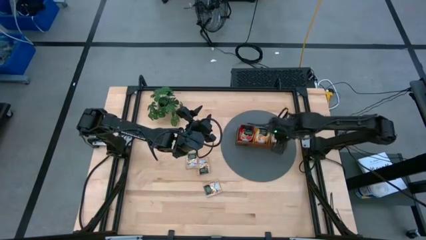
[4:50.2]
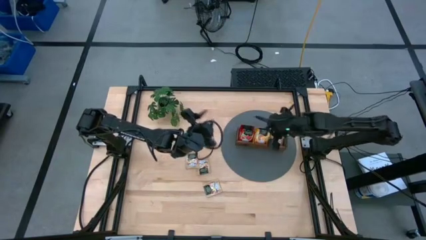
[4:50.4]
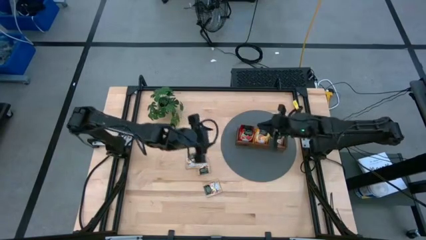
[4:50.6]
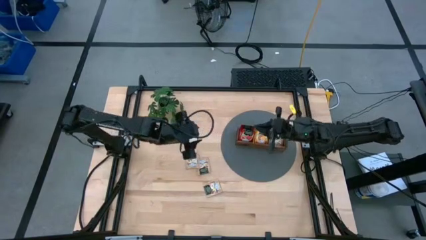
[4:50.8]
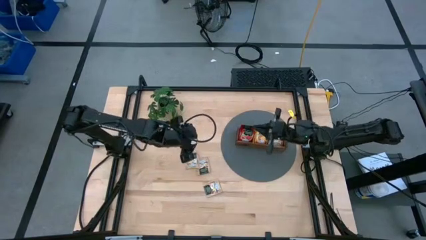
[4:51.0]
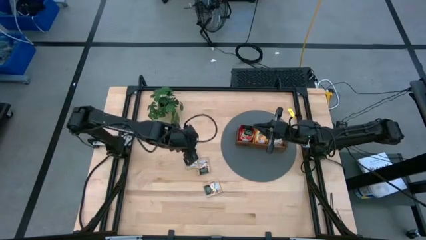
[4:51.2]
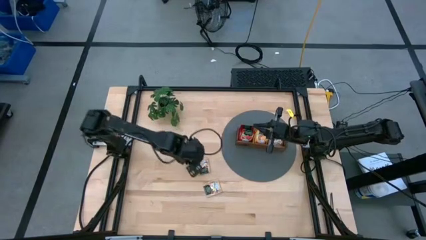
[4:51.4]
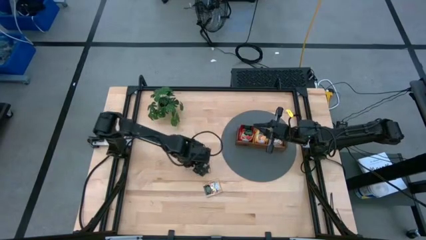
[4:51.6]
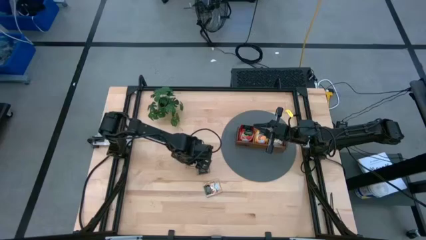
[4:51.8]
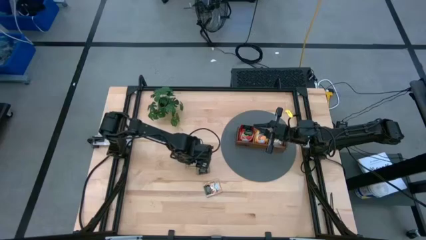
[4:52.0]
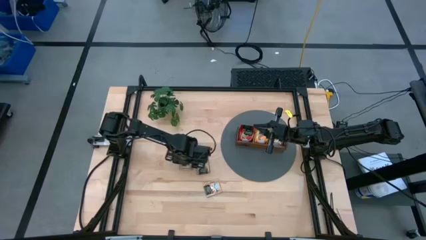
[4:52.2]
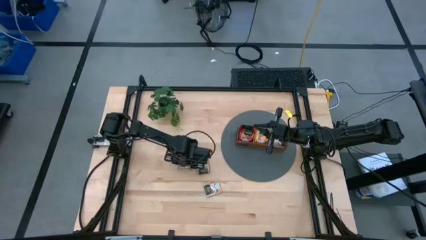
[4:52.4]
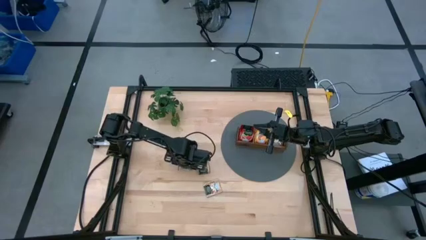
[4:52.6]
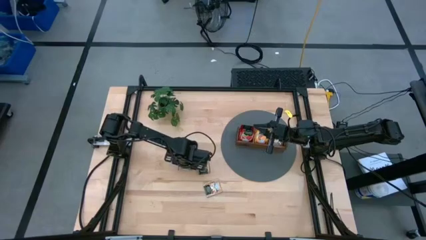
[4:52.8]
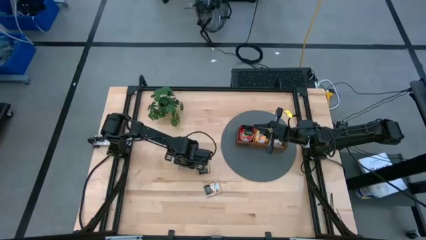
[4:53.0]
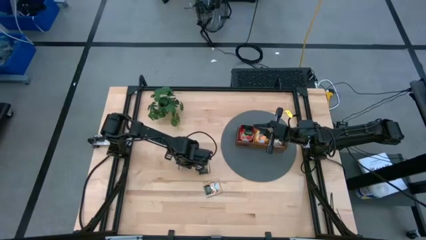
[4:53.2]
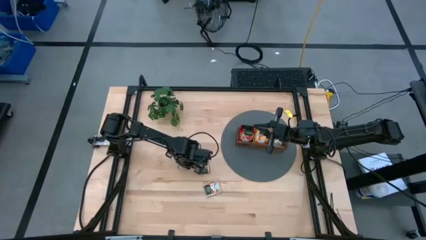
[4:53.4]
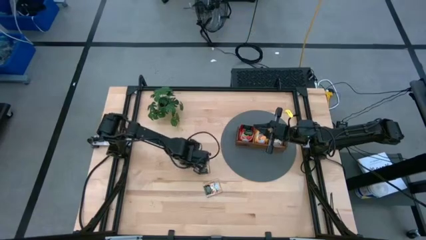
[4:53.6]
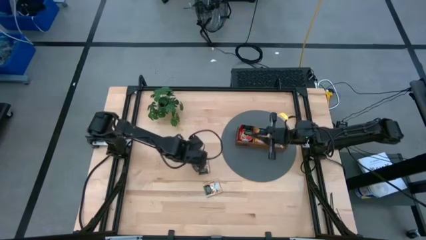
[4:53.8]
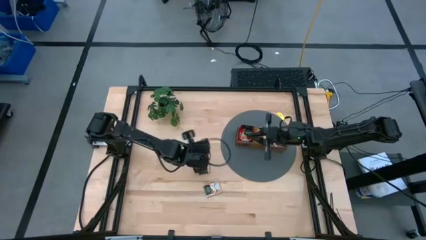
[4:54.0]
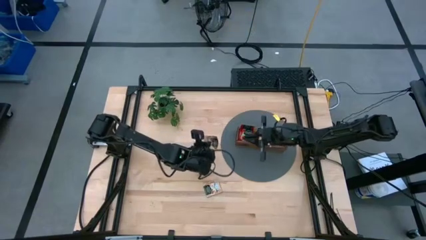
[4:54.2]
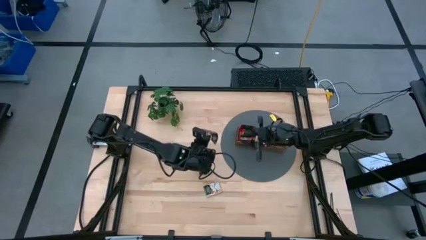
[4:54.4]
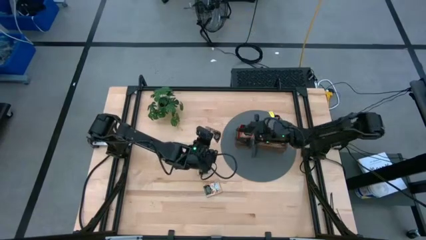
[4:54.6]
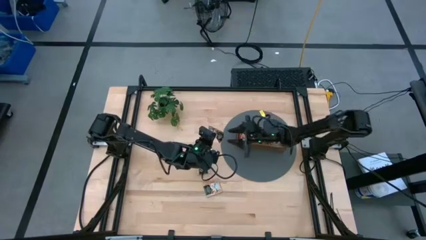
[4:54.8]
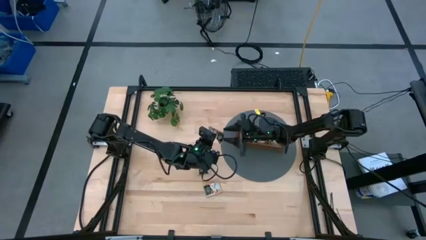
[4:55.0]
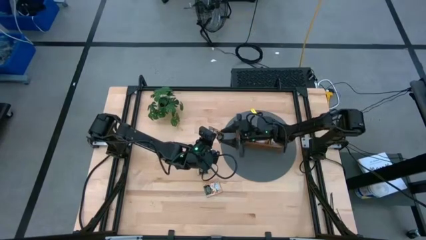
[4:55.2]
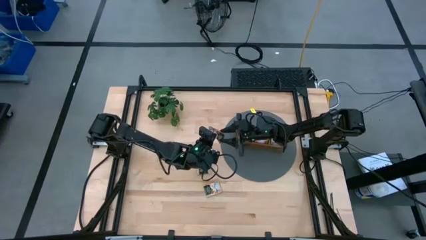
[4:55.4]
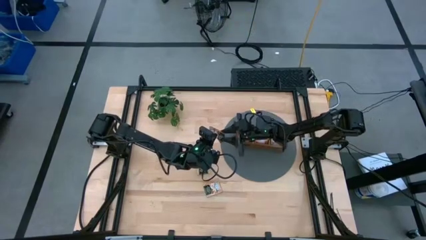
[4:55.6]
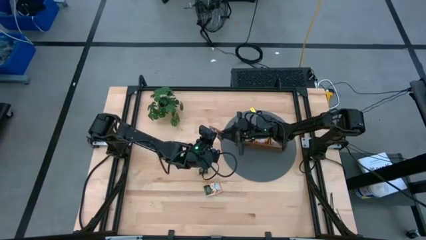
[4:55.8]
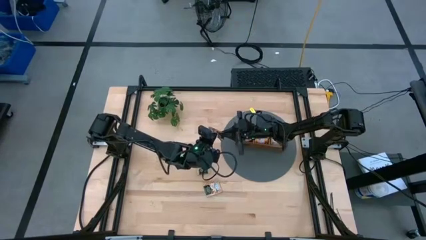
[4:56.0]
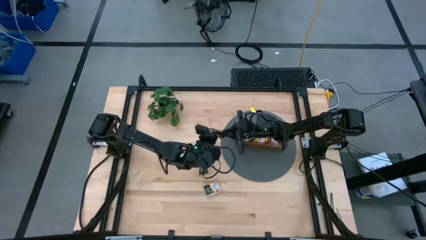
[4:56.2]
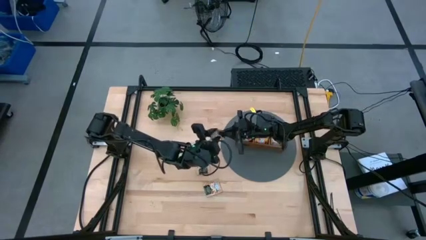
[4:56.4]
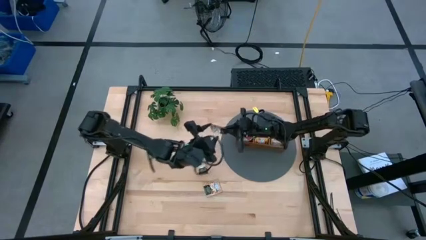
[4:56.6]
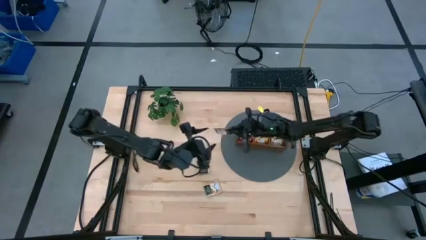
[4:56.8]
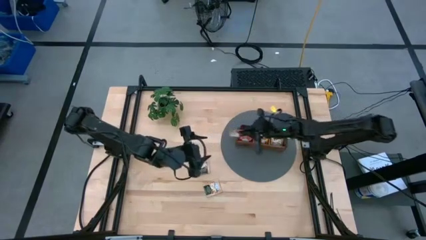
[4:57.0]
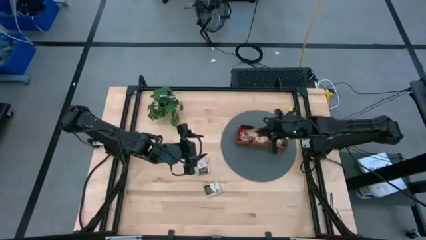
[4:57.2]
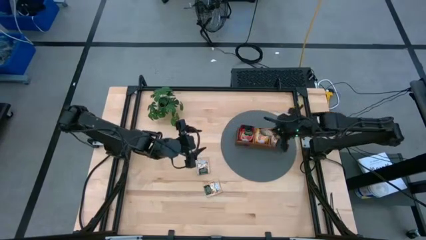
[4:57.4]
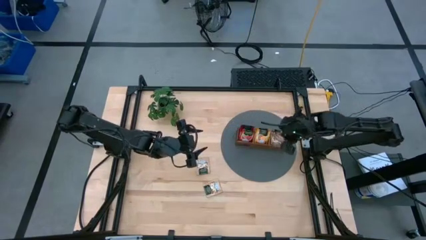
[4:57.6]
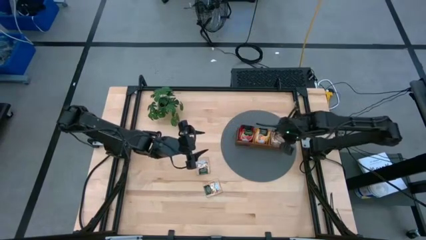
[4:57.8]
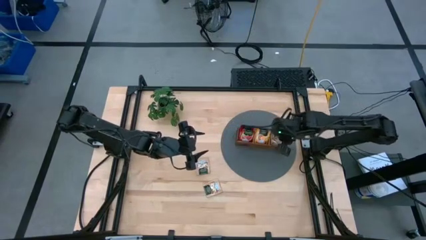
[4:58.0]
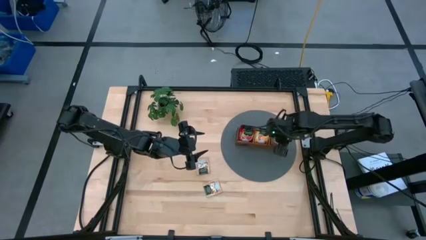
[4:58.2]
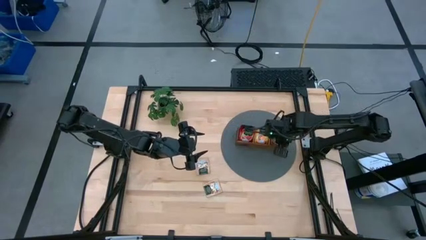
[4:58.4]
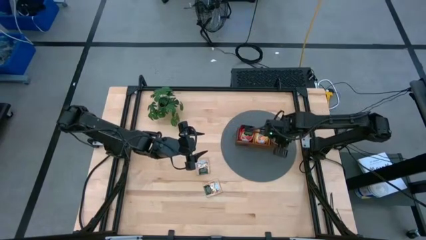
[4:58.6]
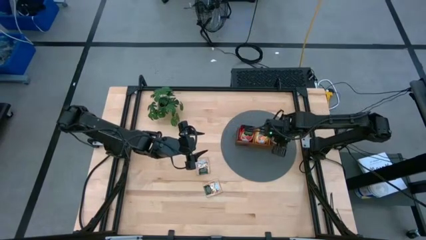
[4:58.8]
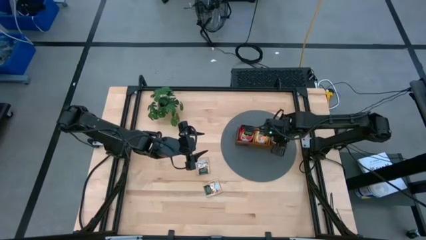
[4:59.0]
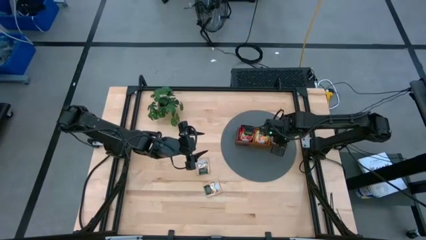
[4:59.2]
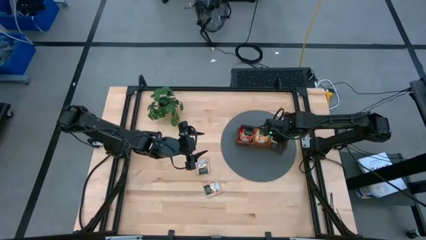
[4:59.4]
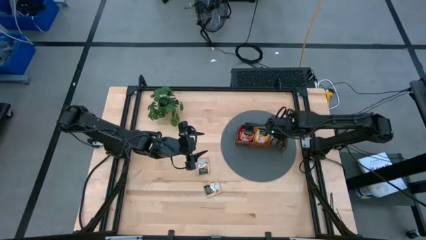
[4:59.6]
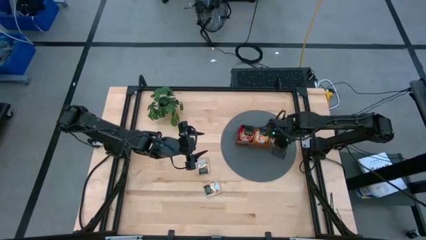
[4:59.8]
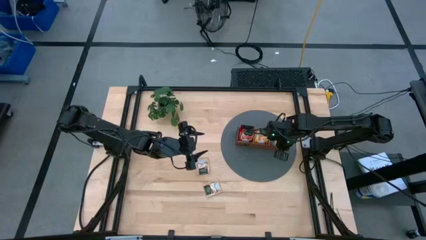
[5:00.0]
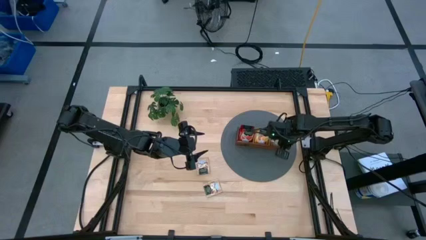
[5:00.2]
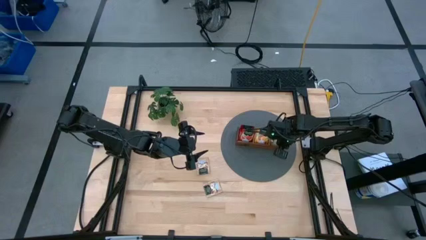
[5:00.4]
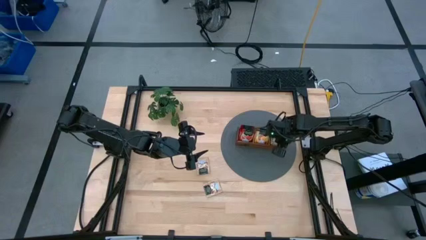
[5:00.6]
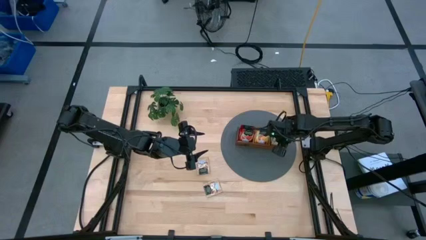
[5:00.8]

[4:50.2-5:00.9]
Task: Pick & Place Tea
Put the brown tea bag into the right section of the wooden organizer

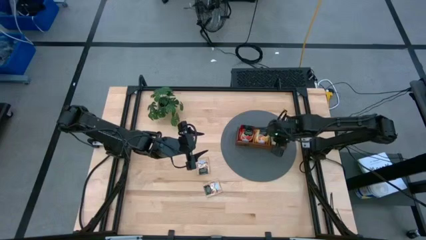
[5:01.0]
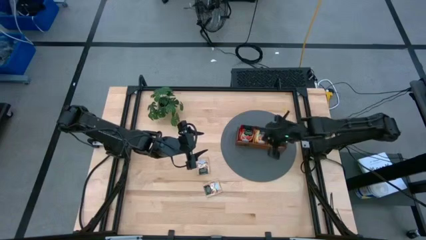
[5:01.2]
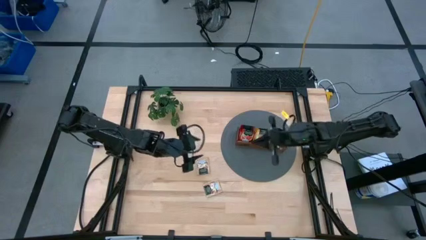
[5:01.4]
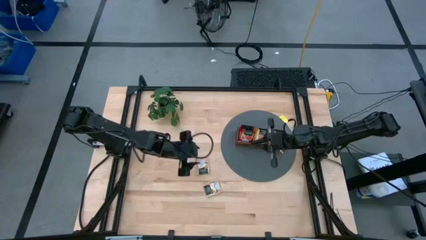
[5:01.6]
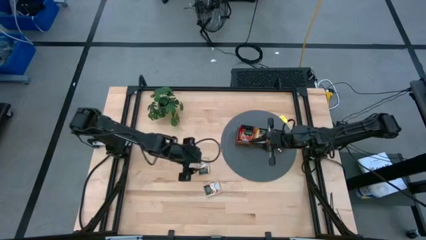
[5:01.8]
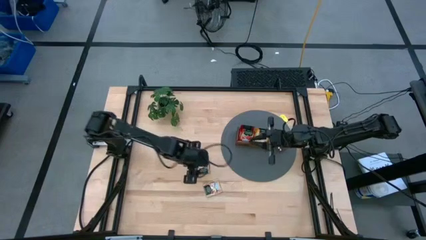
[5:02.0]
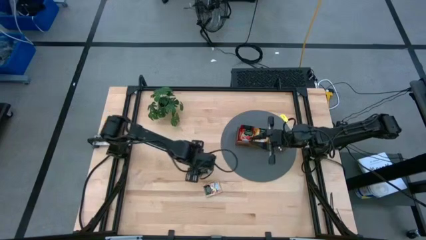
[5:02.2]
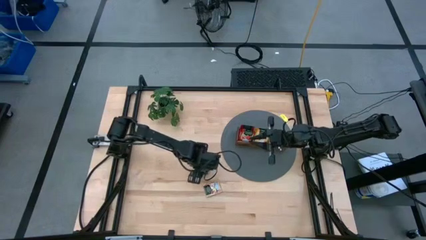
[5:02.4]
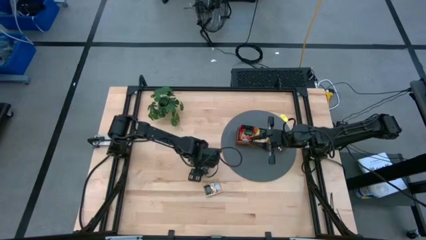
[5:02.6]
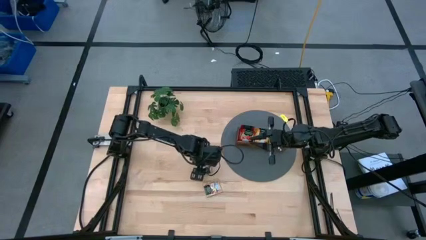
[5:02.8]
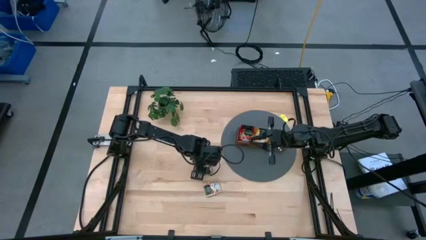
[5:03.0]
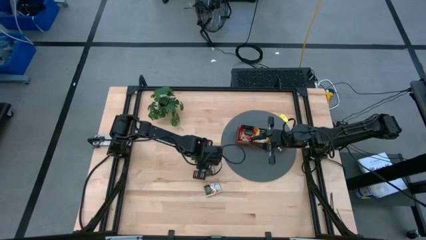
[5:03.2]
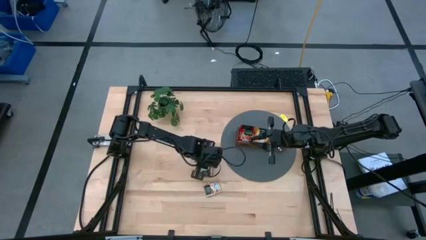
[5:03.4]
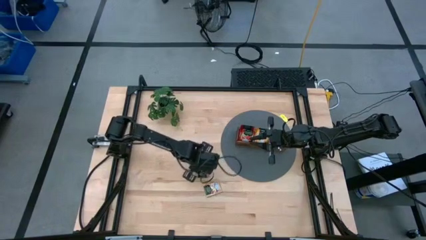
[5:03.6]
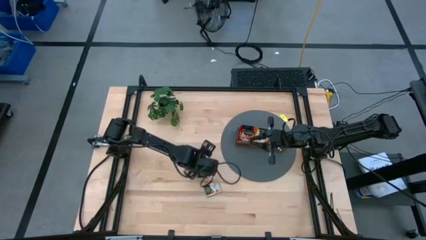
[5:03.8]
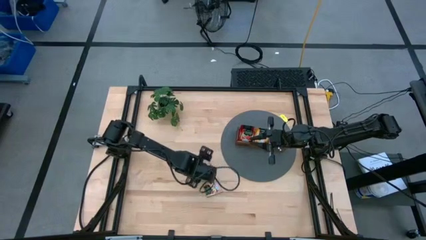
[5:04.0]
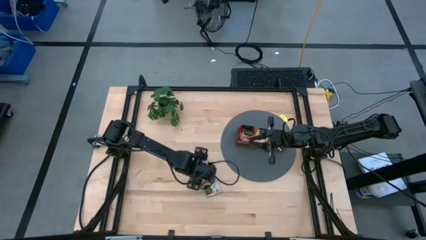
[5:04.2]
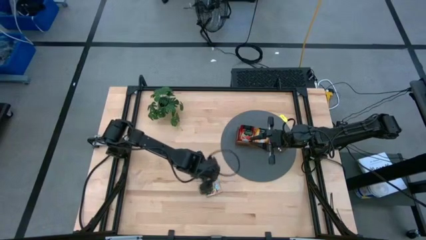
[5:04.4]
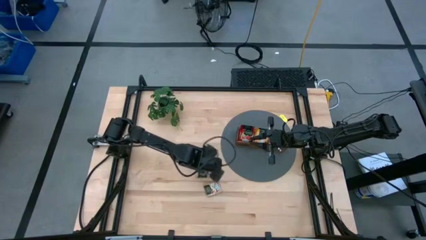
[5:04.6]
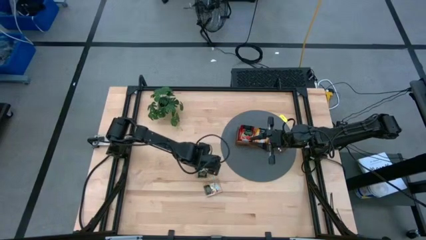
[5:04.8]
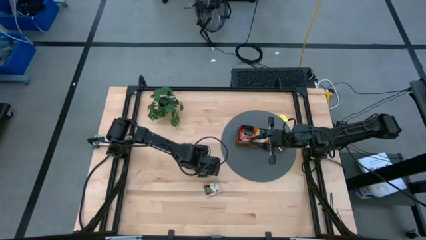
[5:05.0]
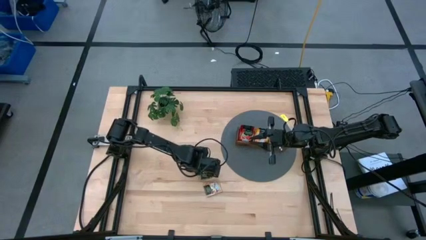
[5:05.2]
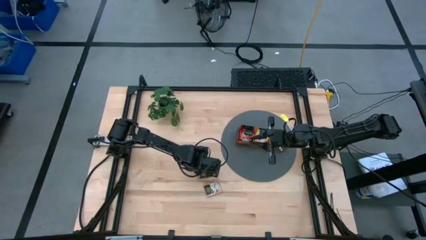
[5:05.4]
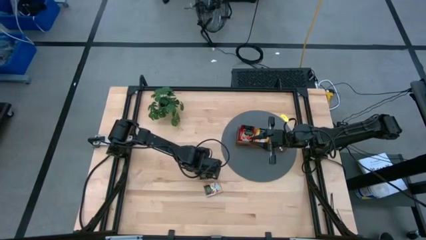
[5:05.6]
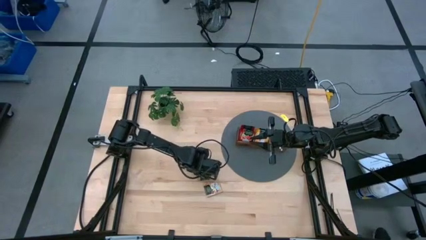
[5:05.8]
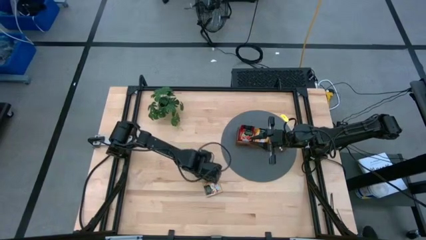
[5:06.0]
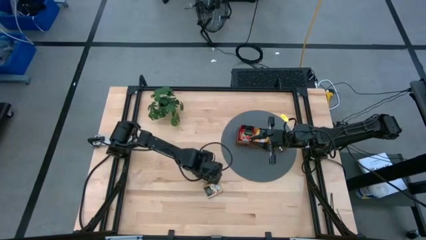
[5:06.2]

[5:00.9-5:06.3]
Put the brown tea bag into the right section of the wooden organizer
